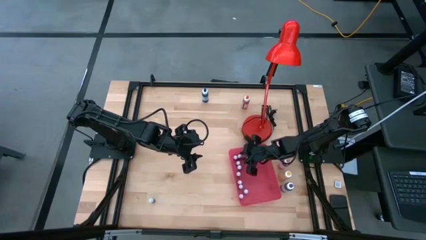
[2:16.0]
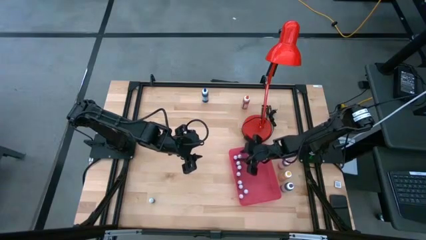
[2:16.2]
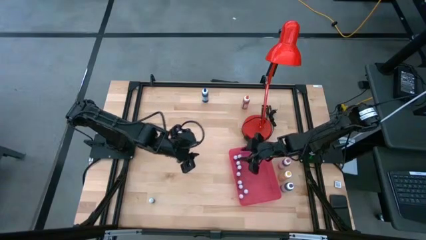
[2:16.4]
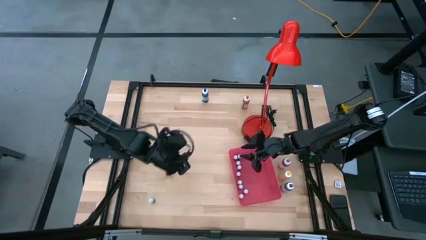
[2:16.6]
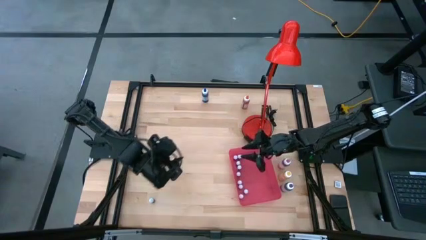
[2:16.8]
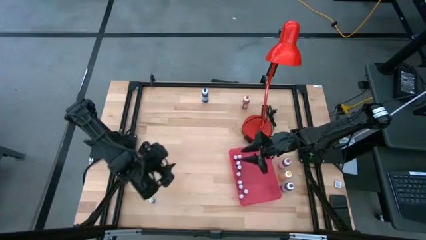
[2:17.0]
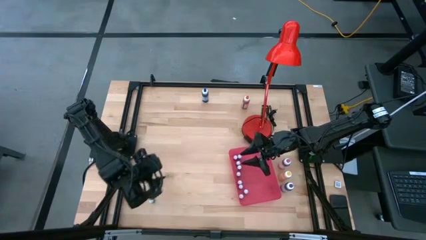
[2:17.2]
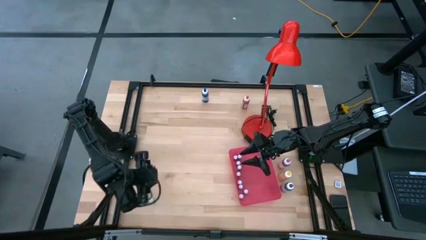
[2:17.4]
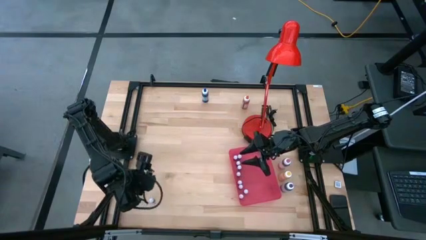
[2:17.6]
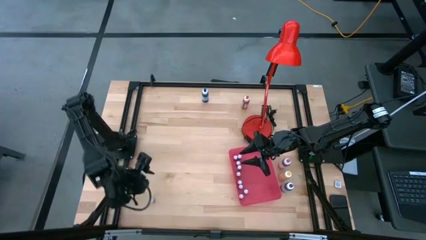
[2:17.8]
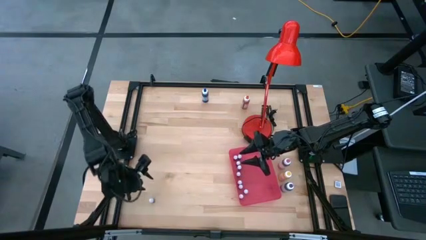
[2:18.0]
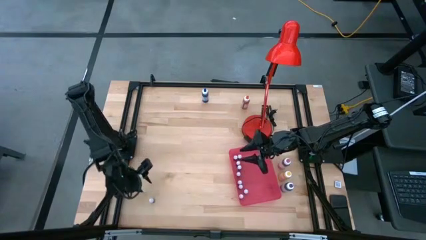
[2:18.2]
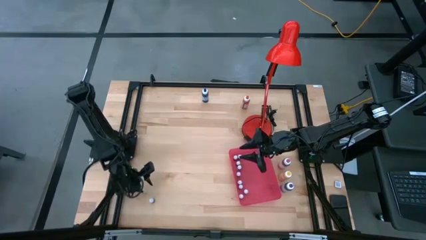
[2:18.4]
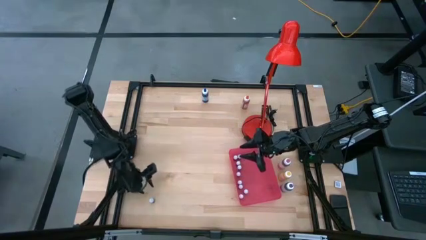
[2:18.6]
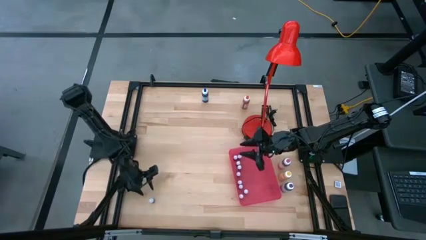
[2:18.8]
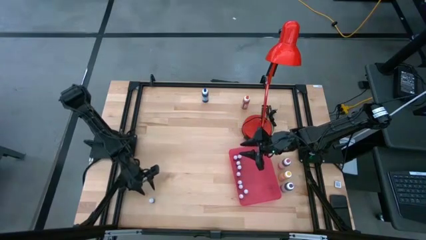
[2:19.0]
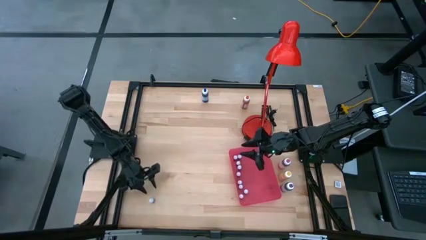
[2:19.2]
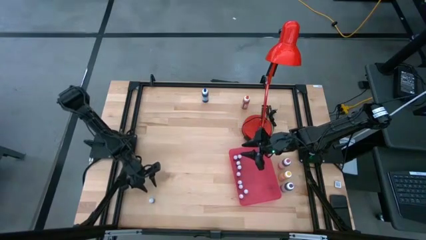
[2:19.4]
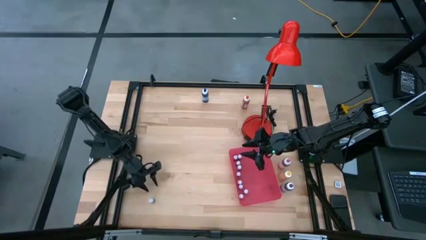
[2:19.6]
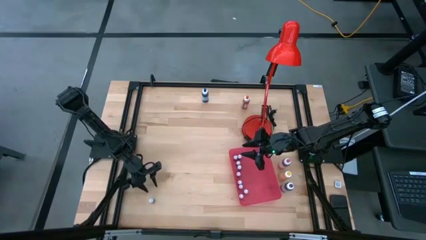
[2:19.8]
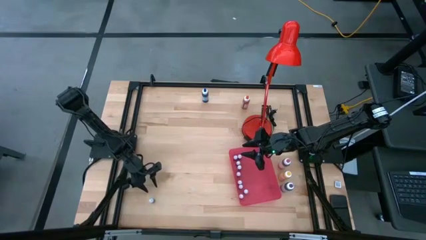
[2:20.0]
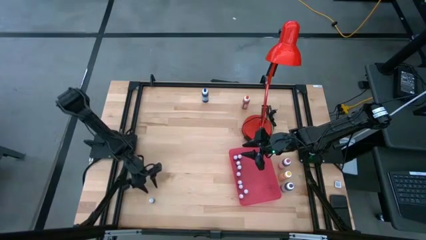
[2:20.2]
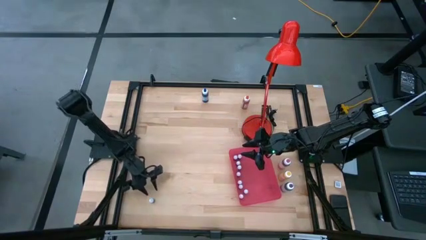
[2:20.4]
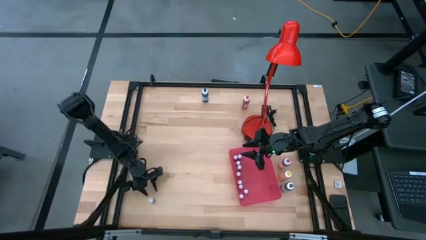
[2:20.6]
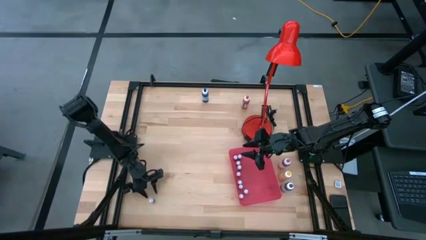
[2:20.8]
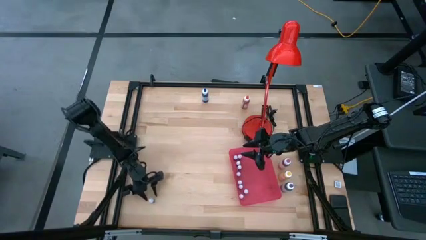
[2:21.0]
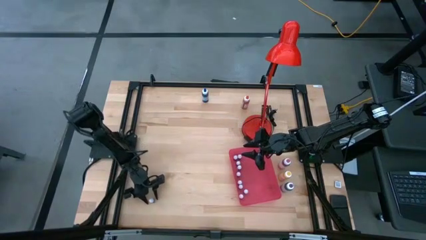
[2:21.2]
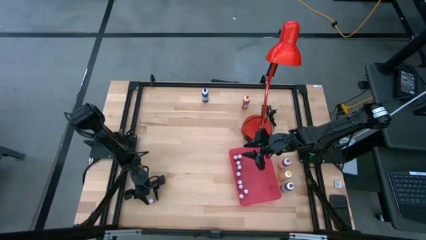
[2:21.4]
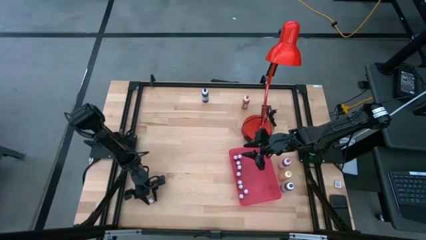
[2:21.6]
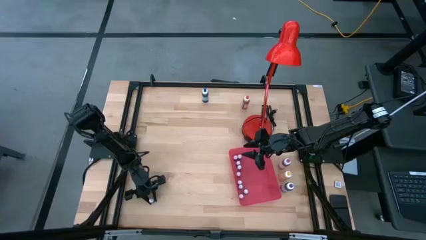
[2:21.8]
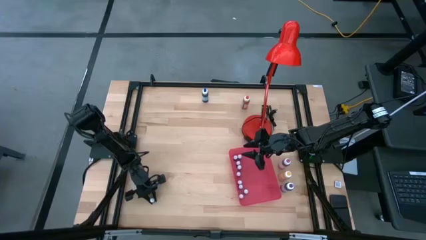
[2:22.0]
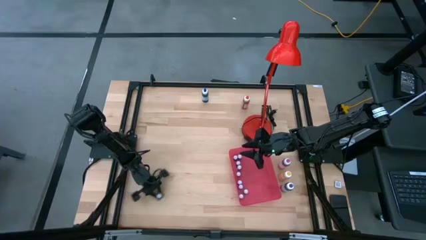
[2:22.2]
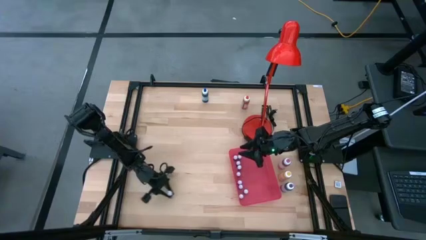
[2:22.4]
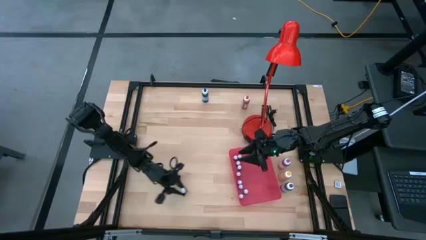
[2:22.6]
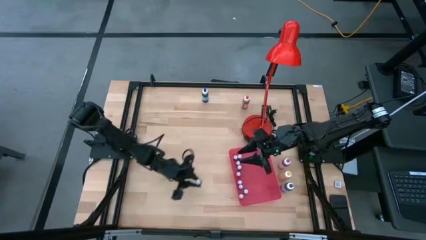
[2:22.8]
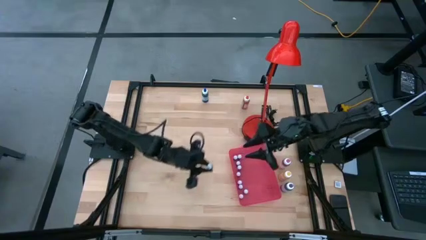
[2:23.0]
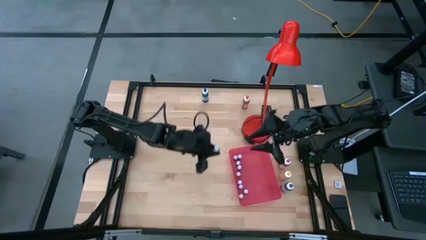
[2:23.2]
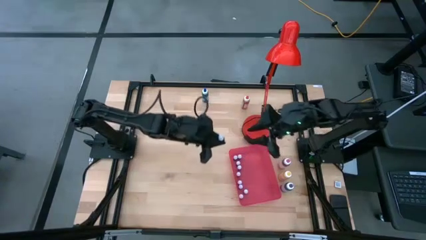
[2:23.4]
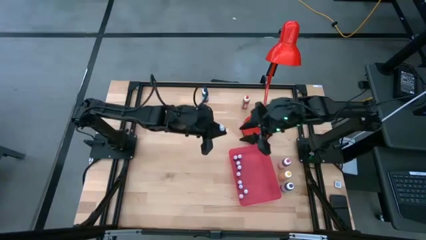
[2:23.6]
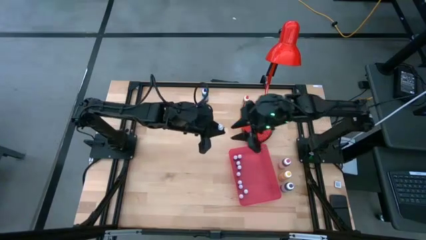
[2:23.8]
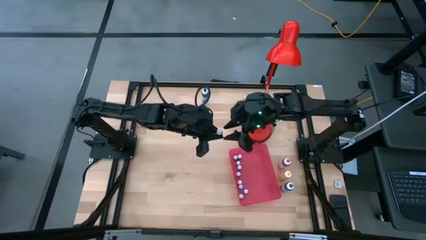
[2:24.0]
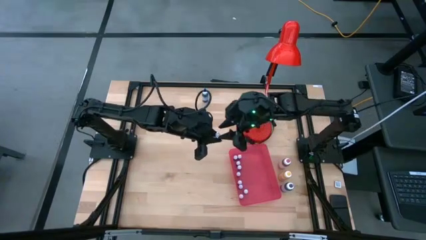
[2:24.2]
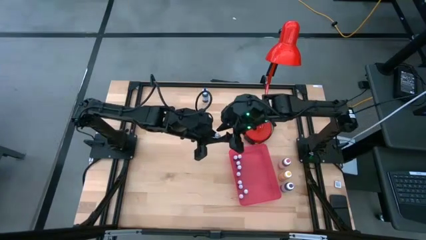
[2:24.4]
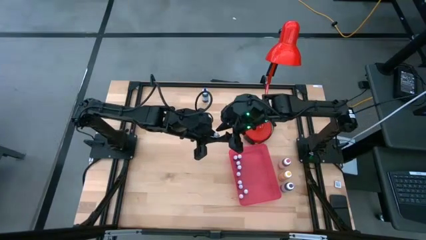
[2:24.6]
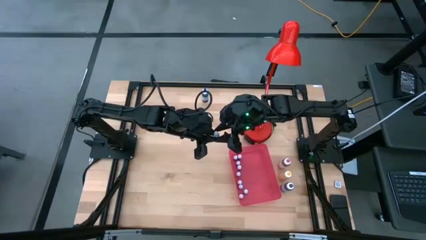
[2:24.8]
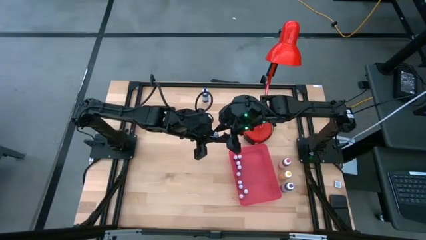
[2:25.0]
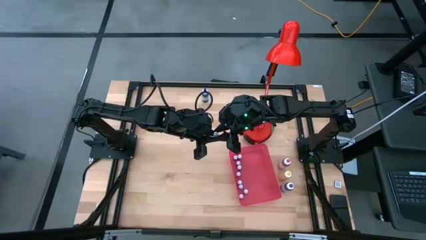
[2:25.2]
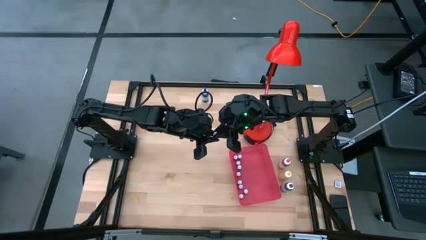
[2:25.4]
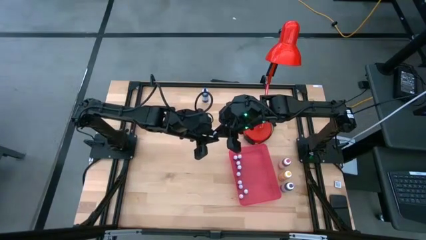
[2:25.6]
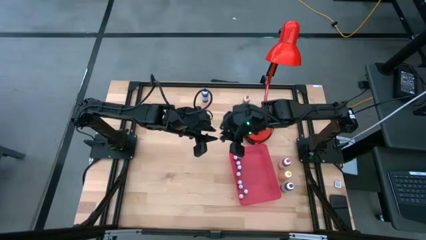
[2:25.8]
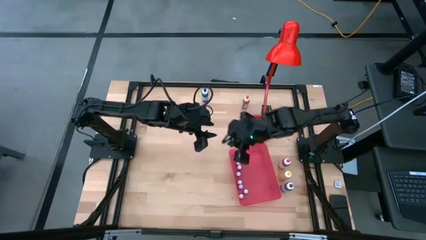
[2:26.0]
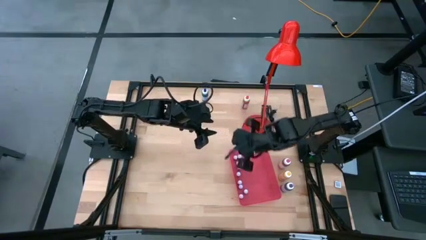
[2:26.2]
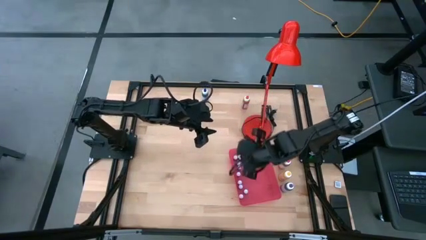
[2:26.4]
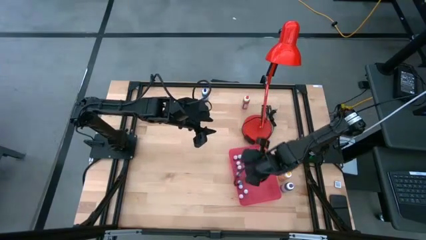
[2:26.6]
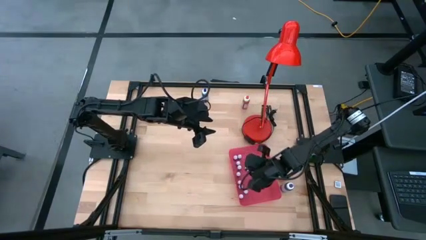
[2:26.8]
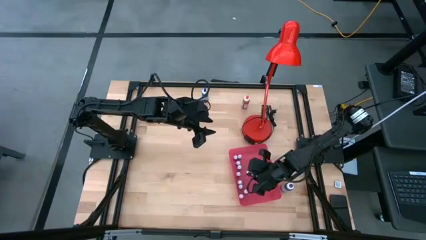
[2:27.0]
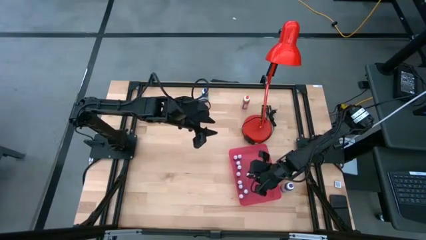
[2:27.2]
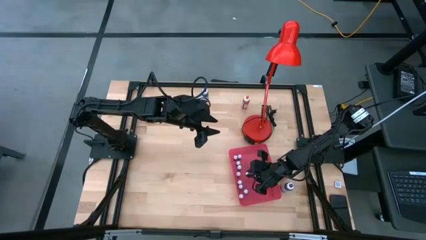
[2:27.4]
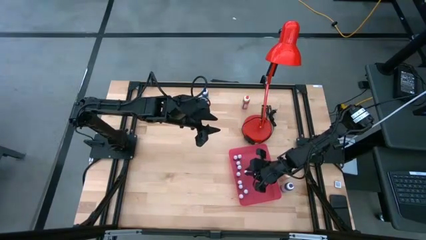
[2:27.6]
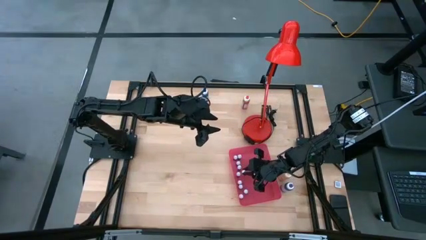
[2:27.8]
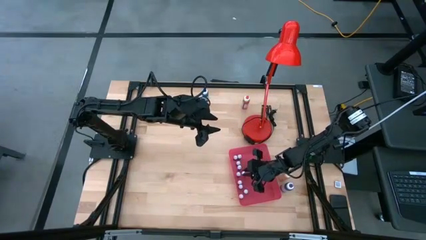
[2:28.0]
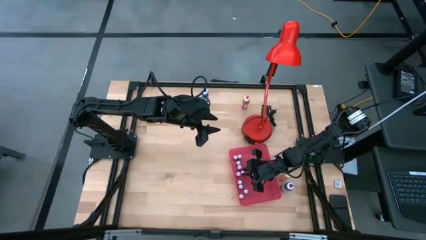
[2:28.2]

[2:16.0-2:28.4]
Task: Pick & Place food coloring
Put the small purple food coloring bottle into the red bin
